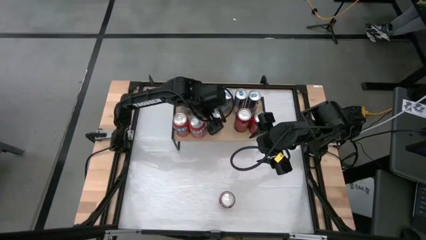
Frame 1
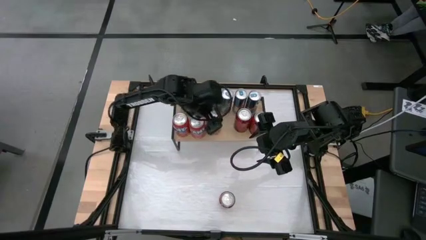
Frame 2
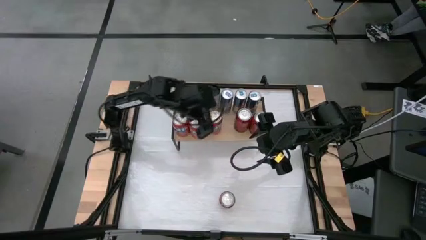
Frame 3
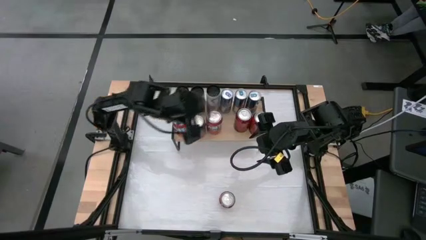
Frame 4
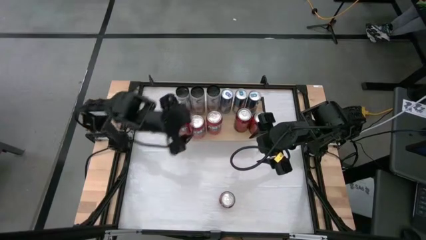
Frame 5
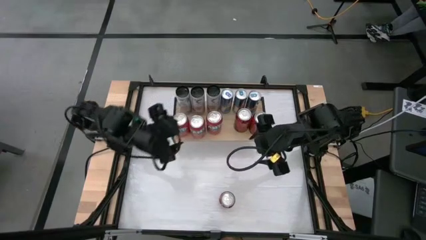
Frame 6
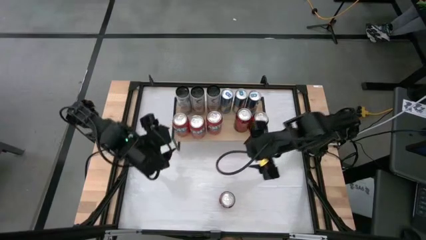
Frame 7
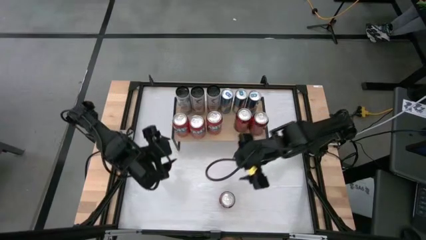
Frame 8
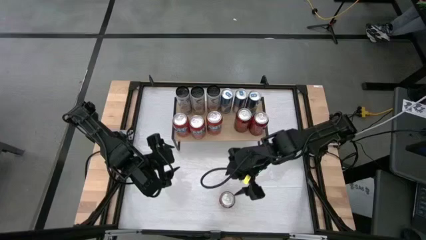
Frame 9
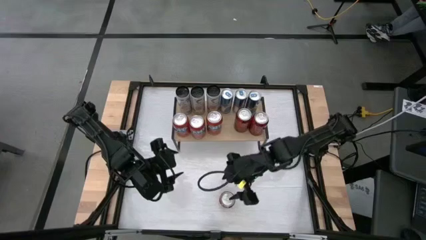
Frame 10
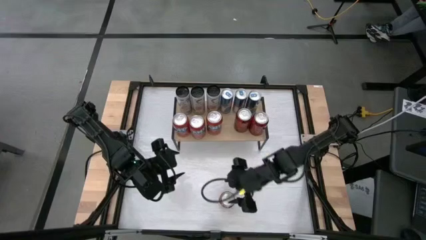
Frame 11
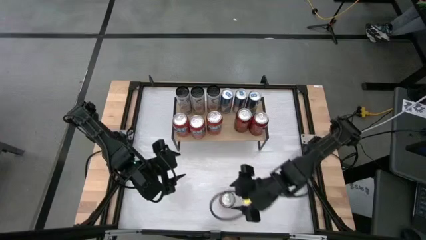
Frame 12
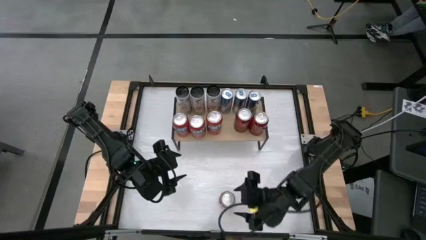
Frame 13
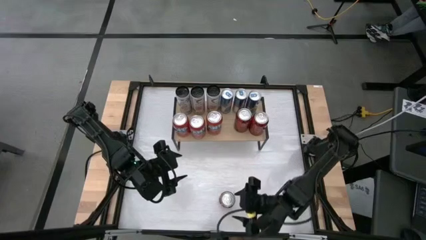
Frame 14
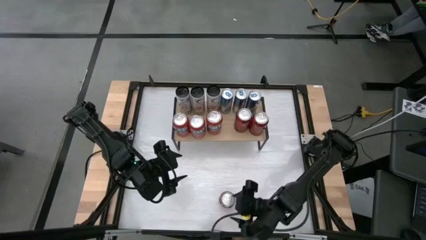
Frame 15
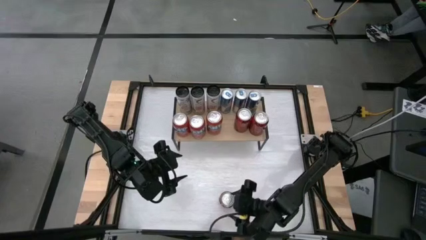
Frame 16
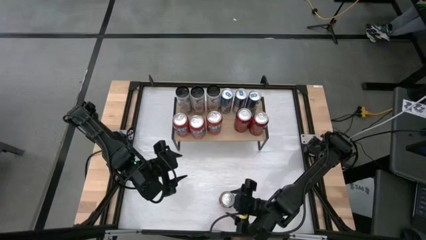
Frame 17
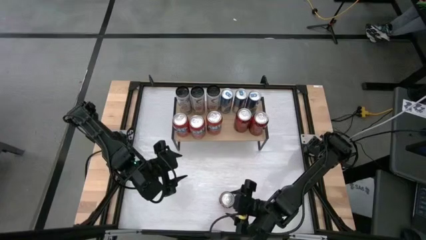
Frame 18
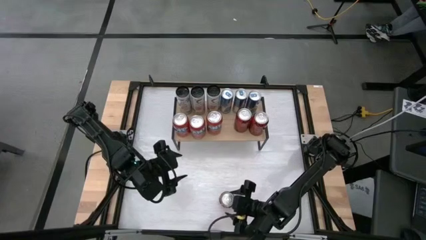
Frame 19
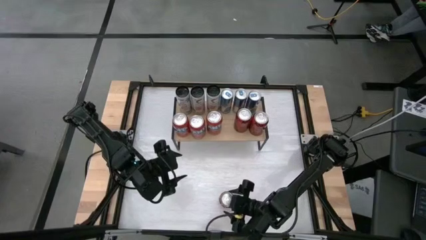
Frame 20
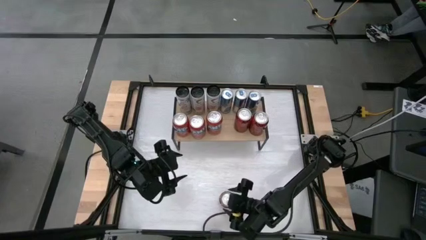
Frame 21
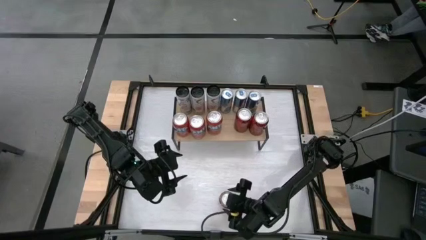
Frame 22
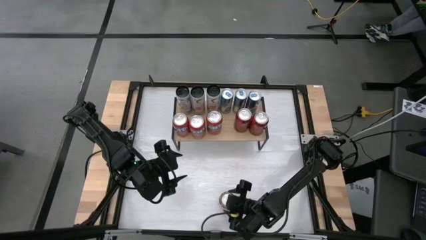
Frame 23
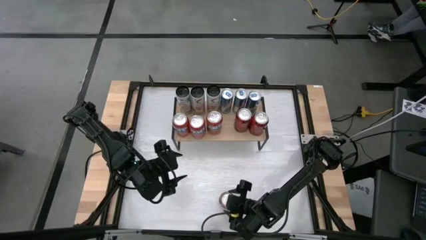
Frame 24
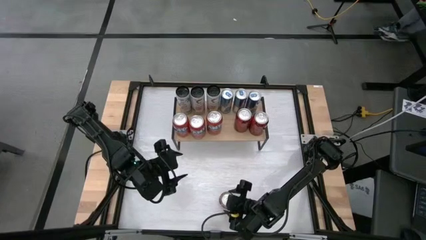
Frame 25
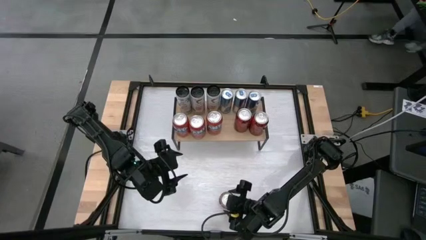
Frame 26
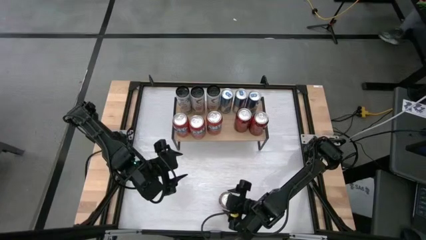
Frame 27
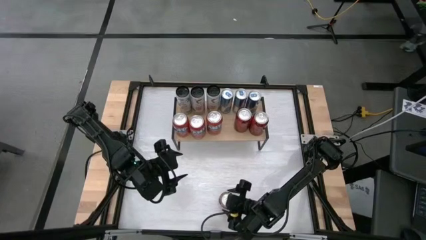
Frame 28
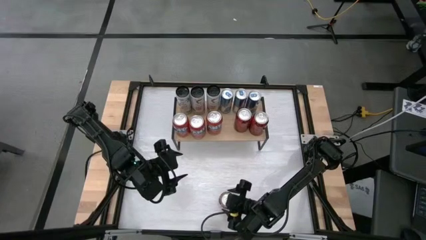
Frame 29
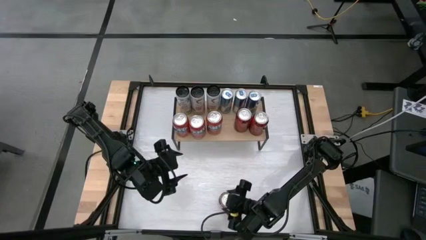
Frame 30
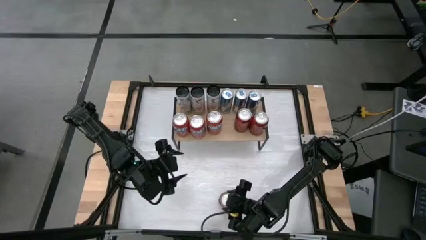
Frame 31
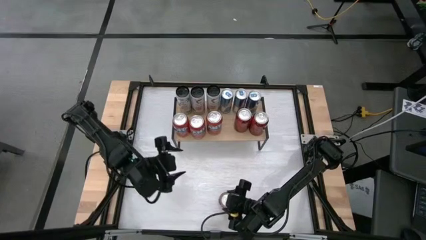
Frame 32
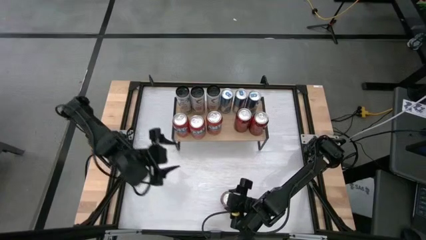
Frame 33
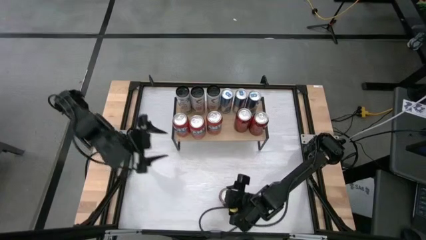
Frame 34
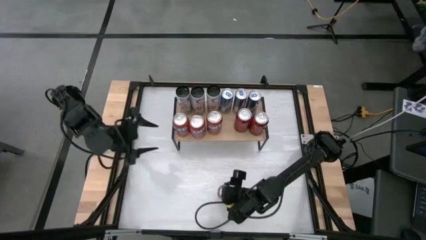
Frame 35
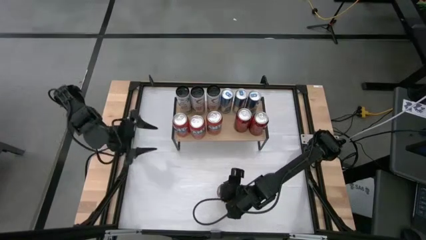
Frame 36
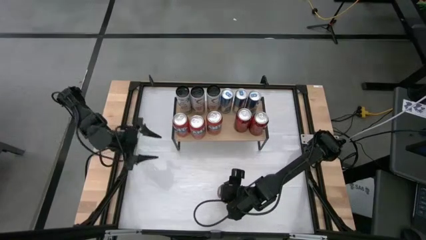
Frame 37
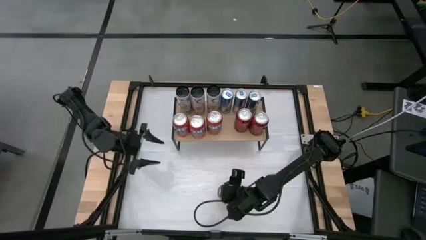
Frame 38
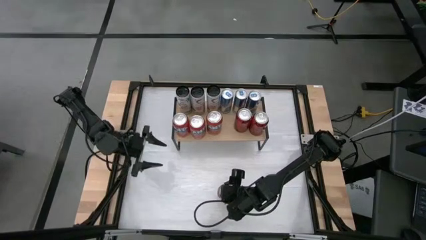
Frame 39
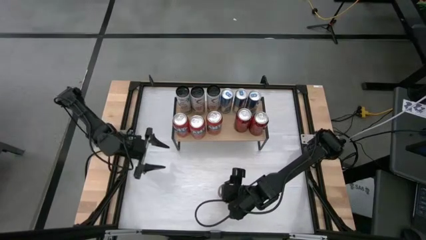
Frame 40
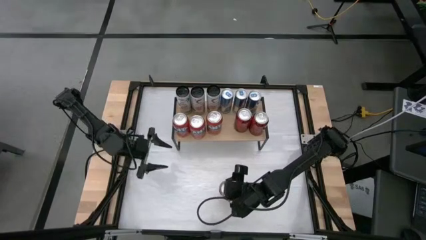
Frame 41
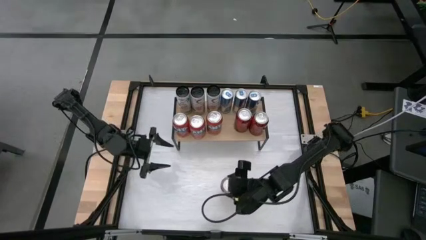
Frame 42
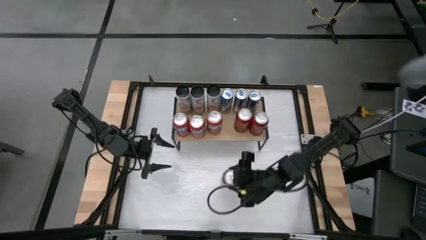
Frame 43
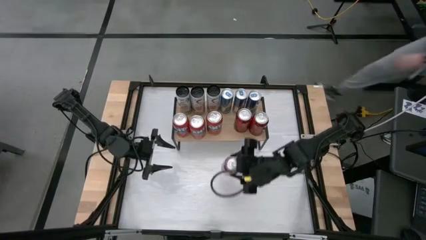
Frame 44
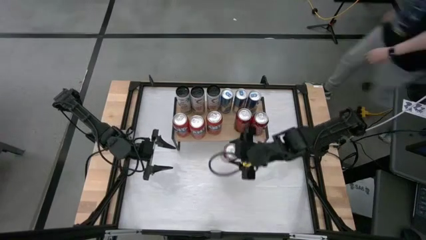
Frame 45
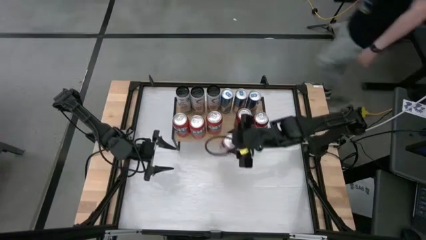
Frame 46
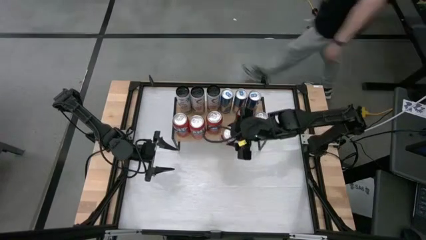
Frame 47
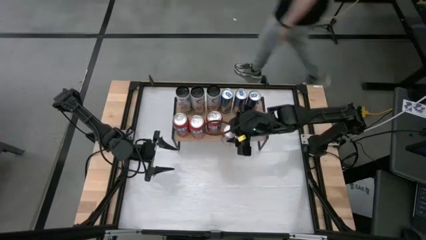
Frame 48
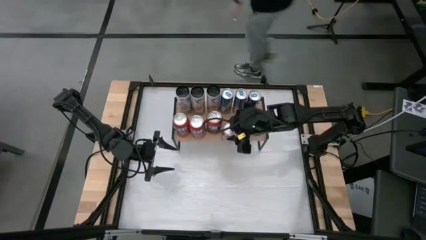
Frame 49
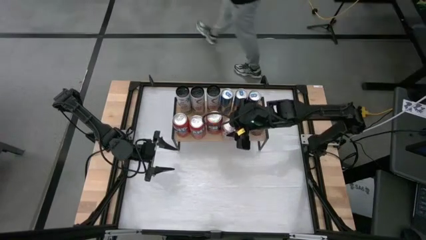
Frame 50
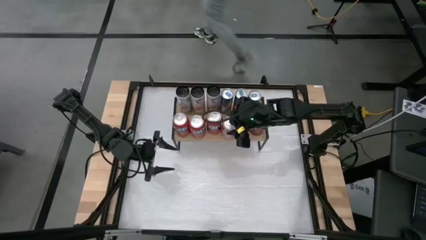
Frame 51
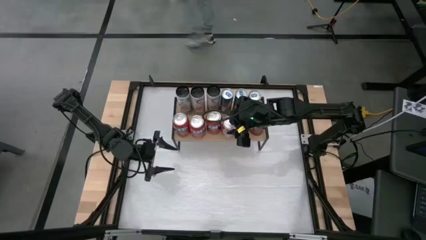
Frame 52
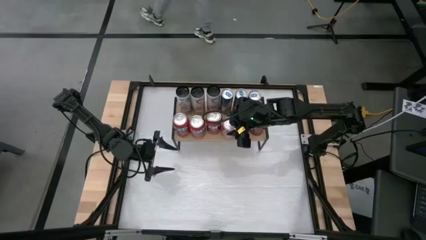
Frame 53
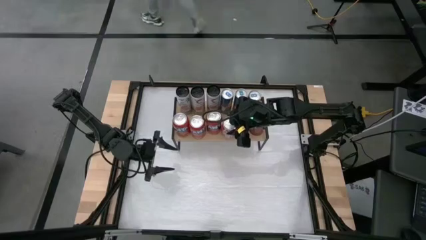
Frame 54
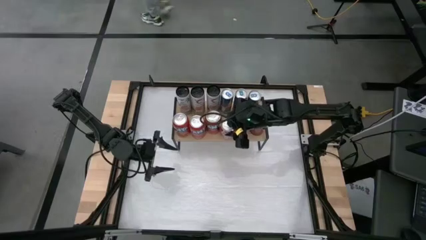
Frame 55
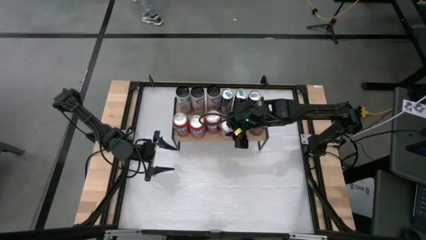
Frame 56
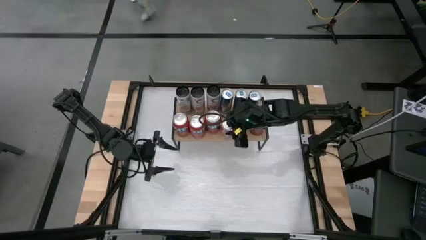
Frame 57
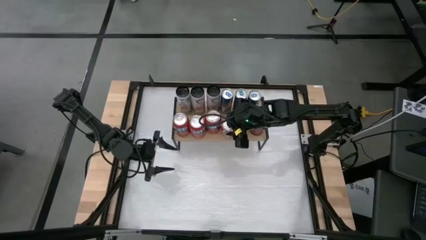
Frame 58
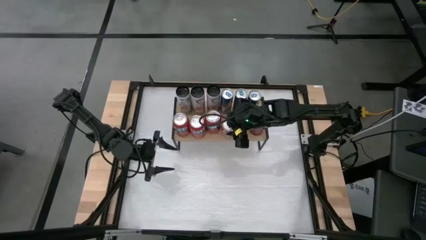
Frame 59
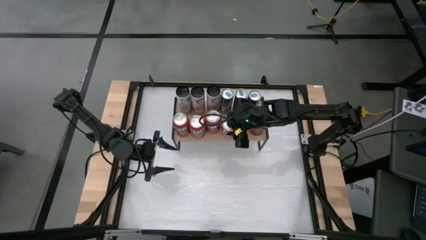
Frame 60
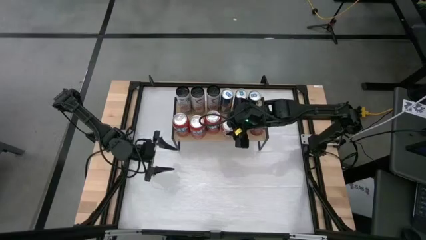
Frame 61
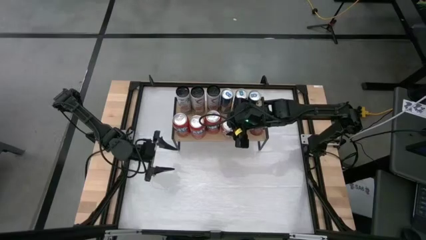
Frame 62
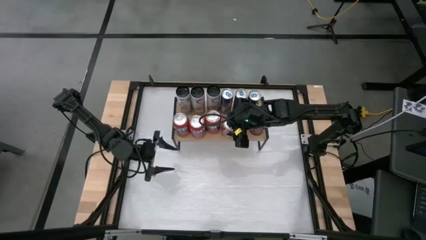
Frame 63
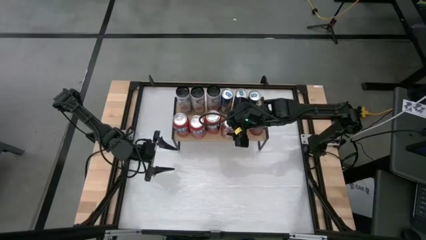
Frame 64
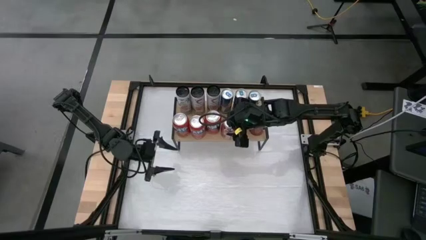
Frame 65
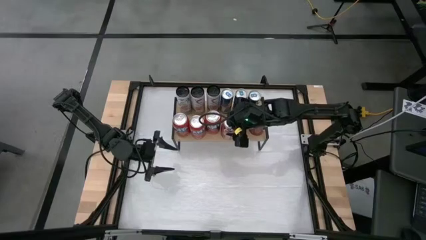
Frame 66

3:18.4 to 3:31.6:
Task: Place canned beverage on shelf
Put the red soda can on the shelf aligned with the blue soda can

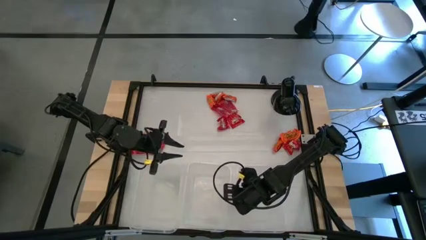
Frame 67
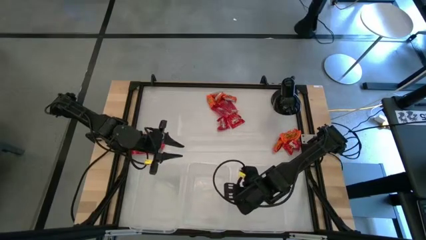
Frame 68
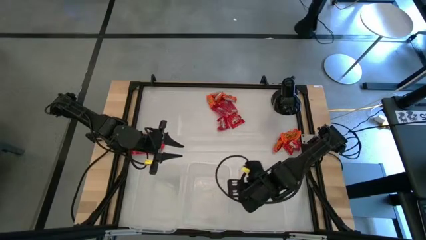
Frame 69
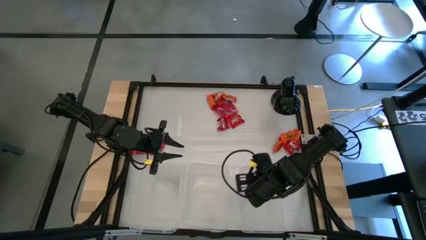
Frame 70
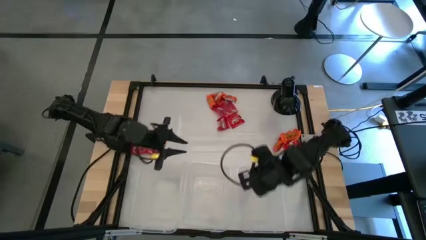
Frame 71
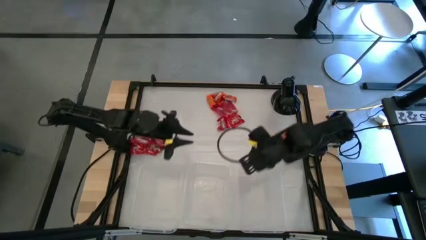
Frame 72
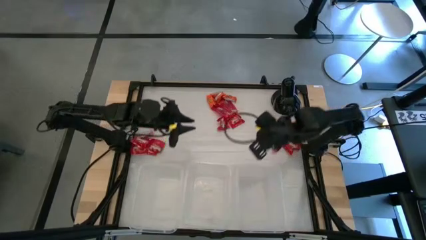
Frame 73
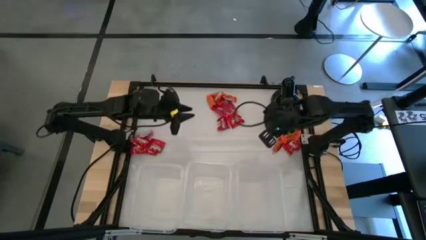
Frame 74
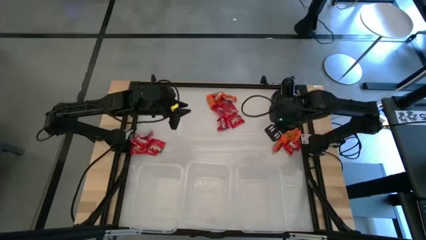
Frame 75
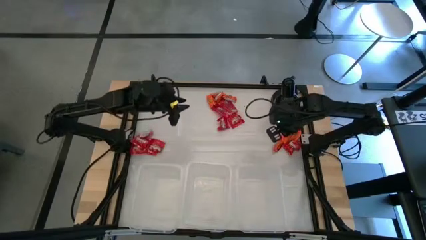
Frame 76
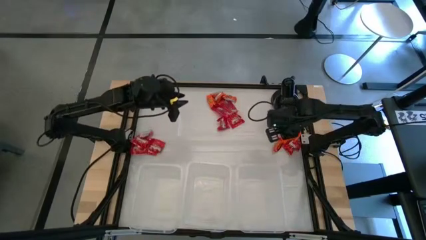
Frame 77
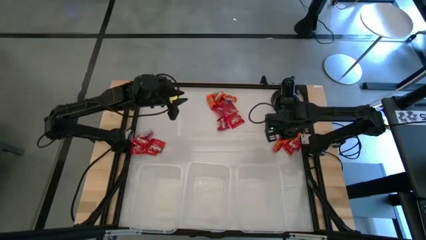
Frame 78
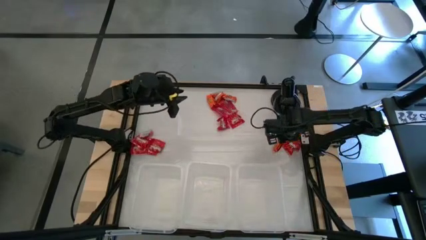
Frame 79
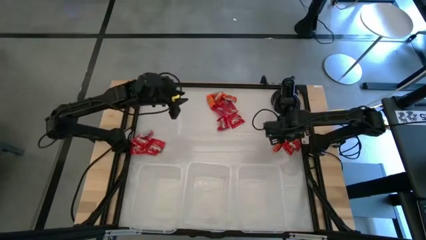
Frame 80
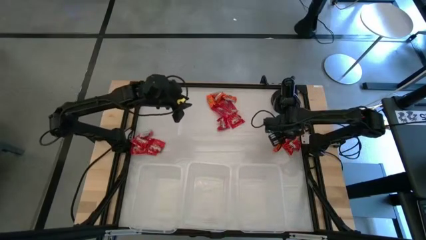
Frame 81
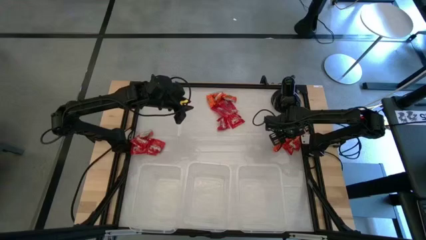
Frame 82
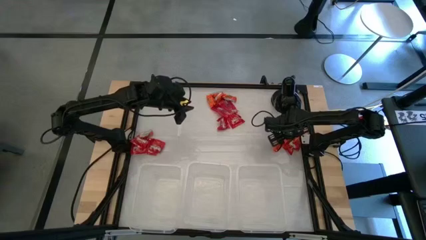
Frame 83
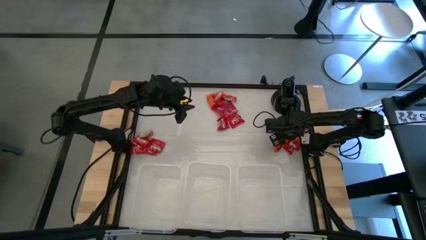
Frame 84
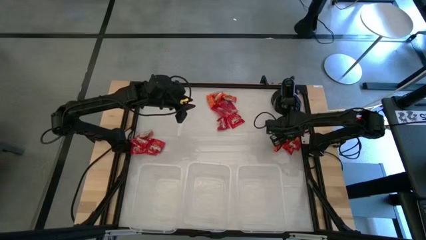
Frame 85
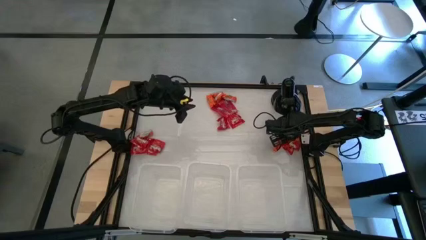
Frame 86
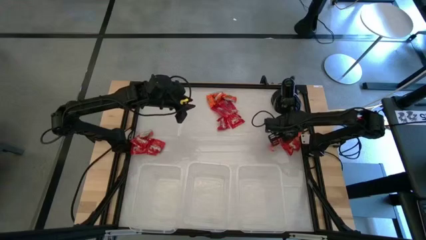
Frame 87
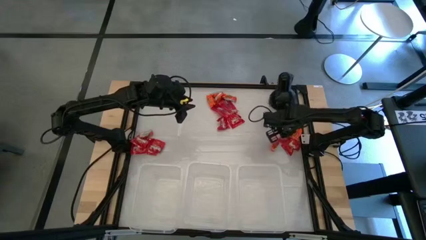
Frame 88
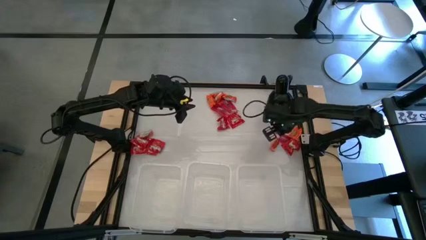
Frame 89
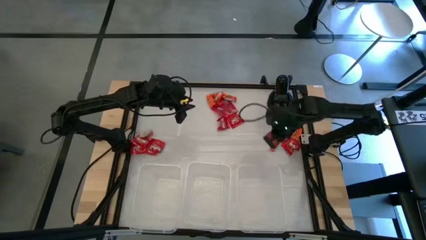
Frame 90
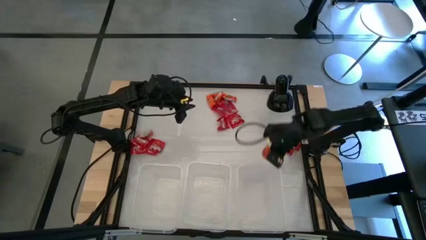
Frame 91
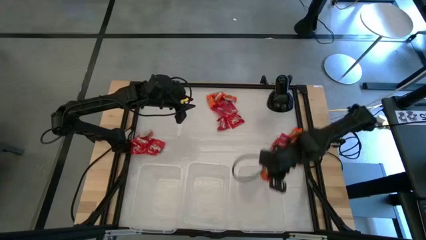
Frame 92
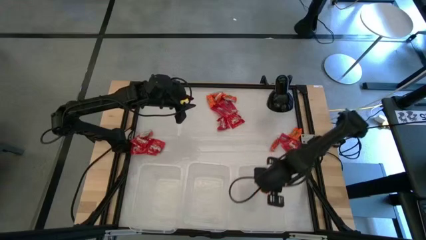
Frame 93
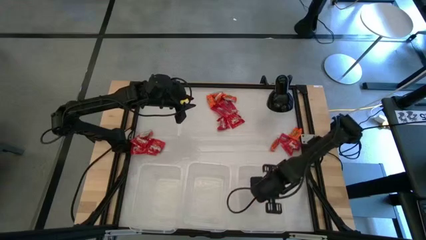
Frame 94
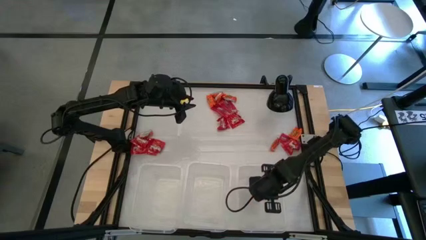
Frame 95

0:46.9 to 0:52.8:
Task: Sort candy
Put the orange candy into the right transparent bin
